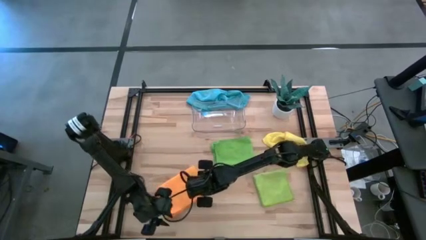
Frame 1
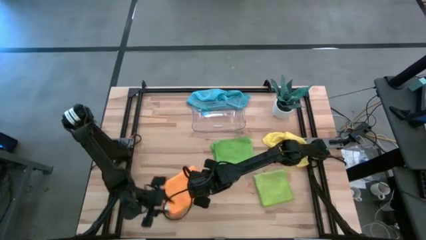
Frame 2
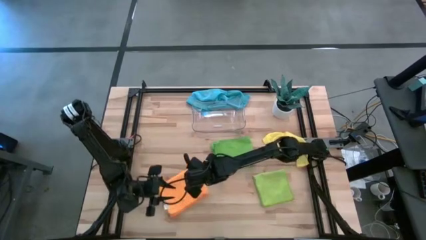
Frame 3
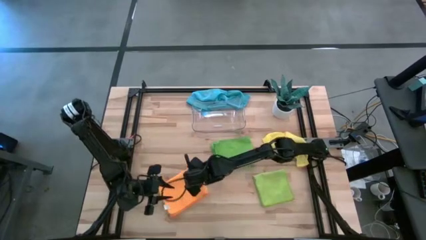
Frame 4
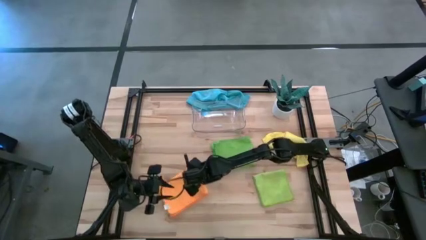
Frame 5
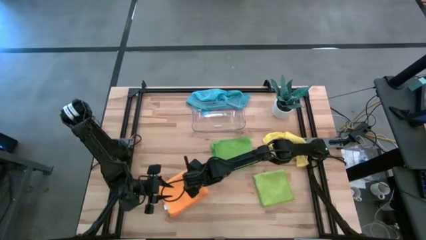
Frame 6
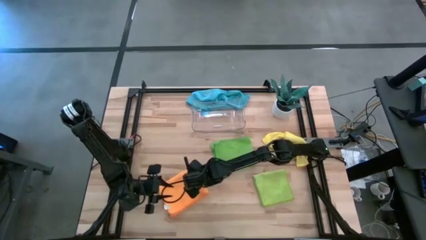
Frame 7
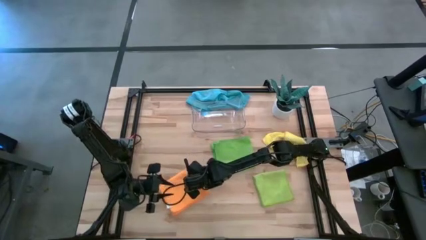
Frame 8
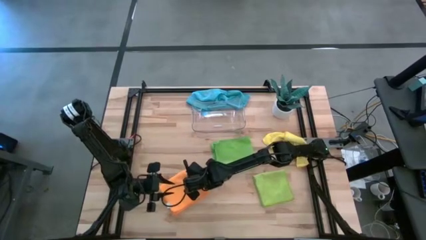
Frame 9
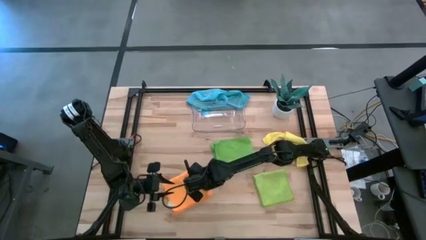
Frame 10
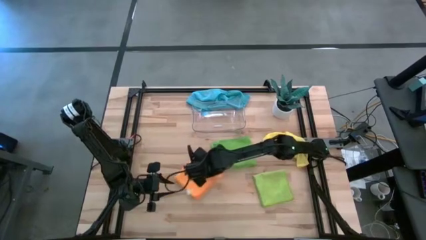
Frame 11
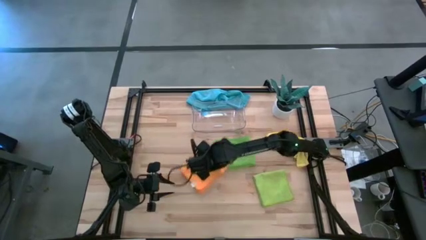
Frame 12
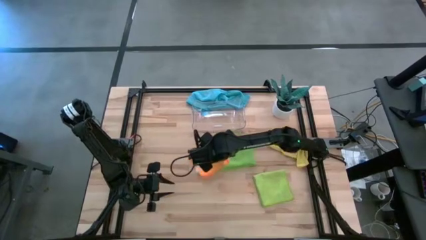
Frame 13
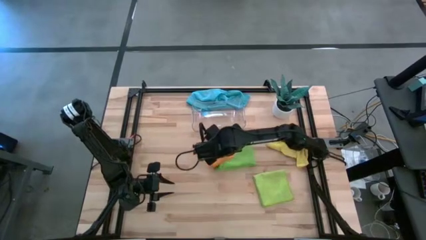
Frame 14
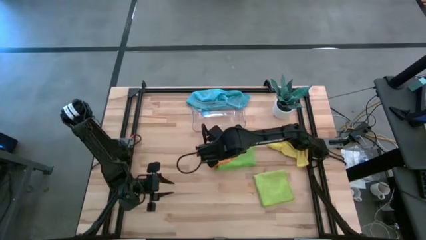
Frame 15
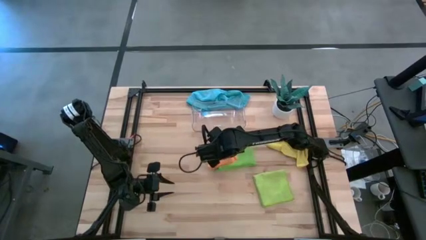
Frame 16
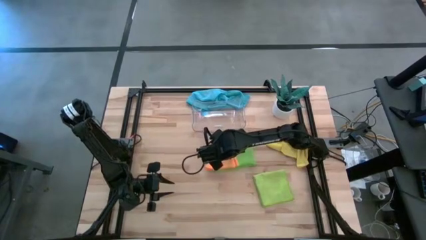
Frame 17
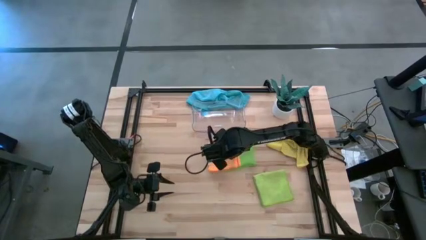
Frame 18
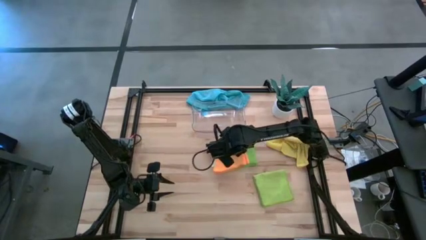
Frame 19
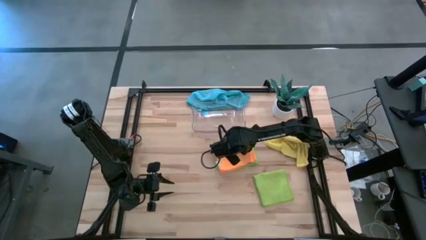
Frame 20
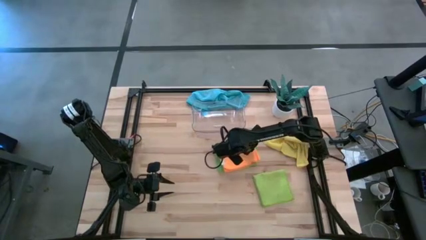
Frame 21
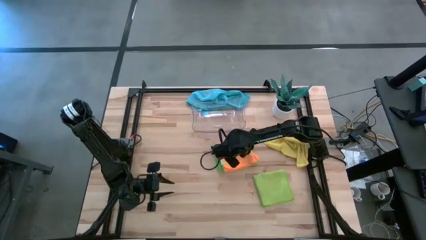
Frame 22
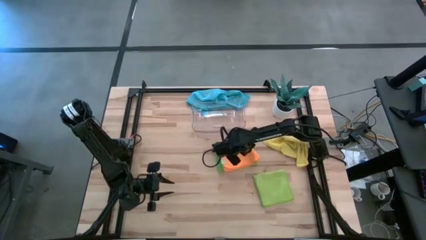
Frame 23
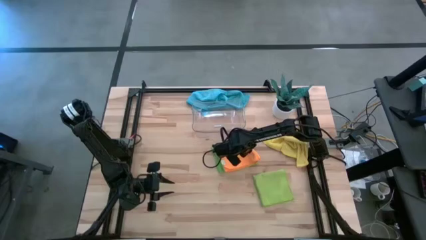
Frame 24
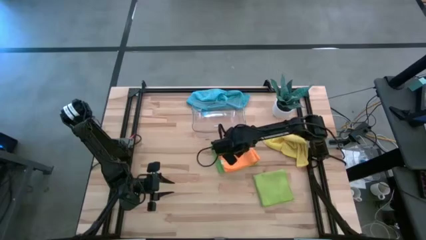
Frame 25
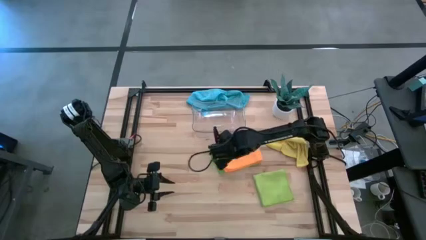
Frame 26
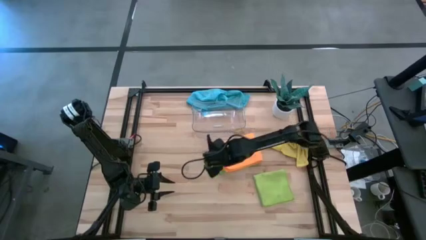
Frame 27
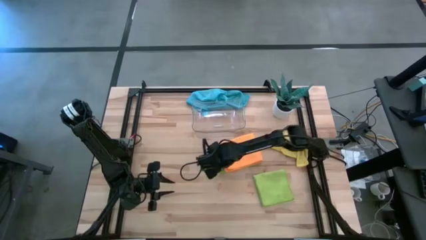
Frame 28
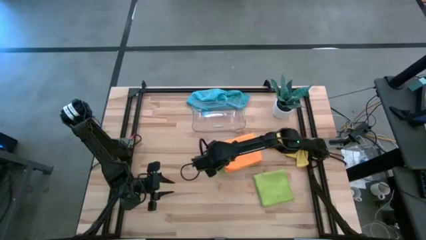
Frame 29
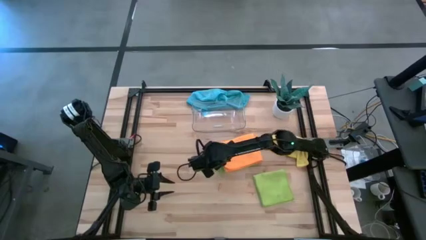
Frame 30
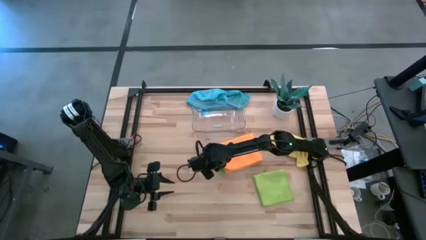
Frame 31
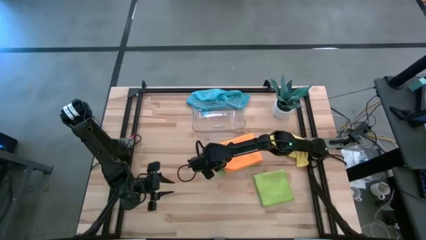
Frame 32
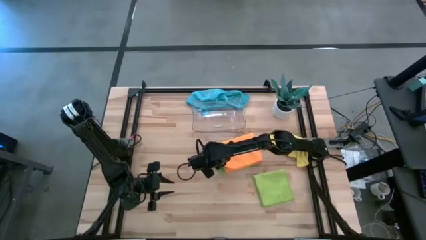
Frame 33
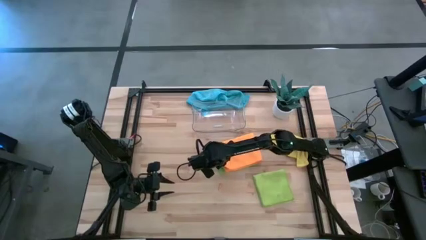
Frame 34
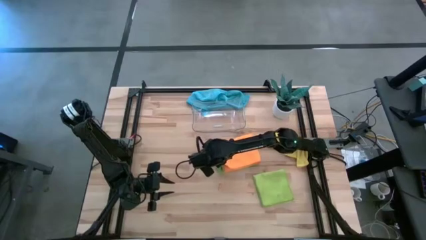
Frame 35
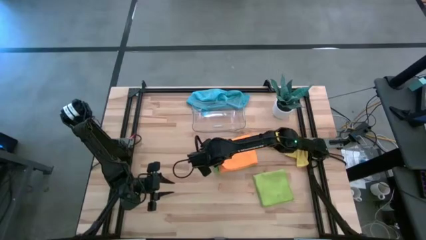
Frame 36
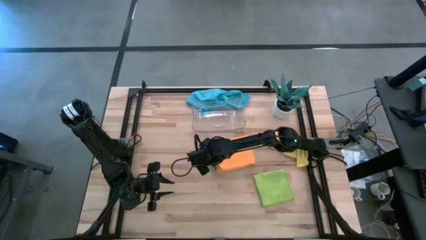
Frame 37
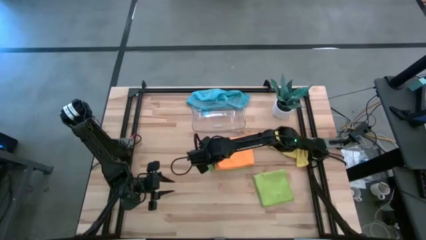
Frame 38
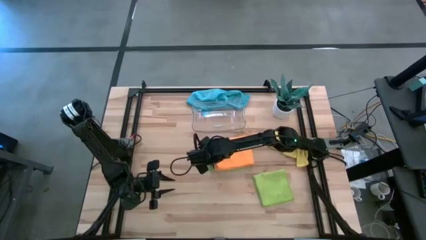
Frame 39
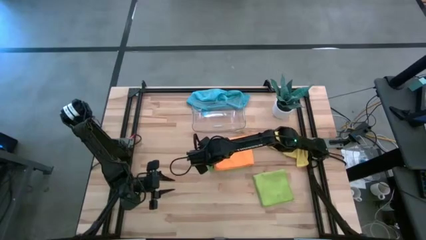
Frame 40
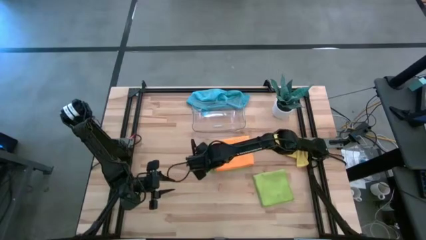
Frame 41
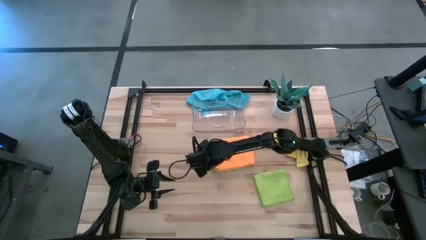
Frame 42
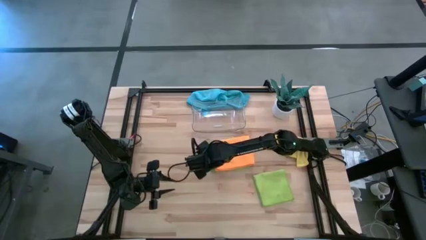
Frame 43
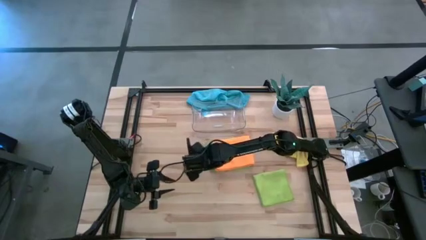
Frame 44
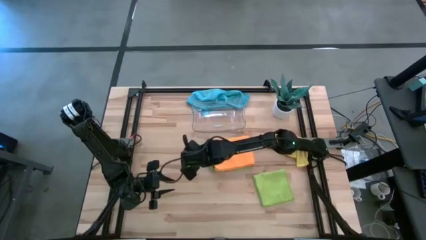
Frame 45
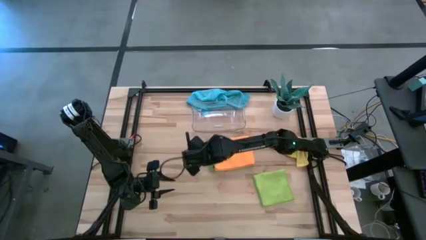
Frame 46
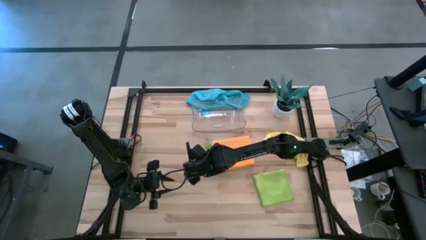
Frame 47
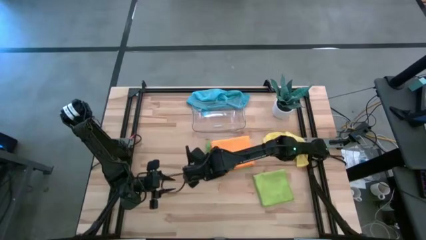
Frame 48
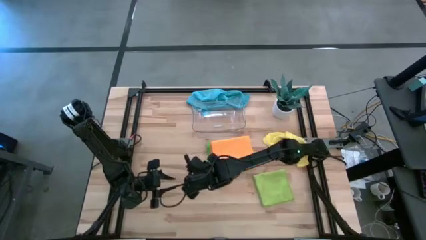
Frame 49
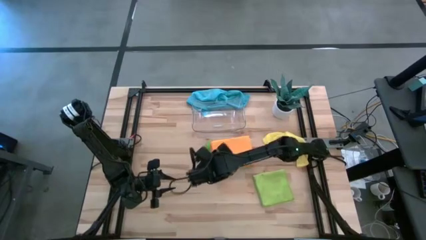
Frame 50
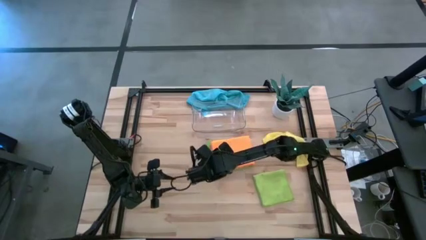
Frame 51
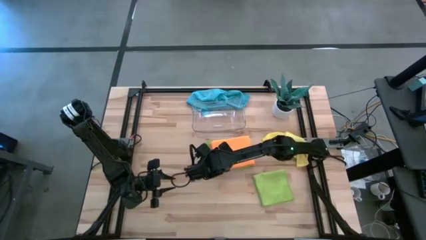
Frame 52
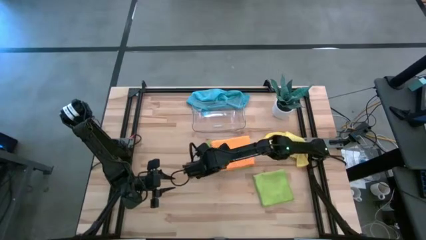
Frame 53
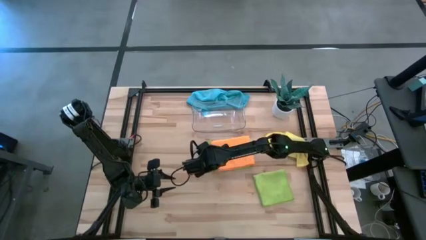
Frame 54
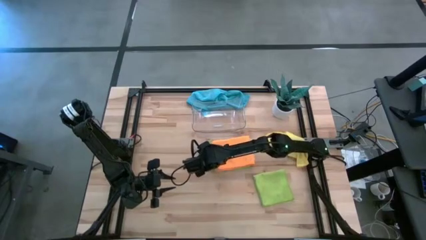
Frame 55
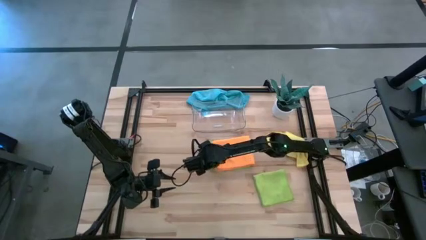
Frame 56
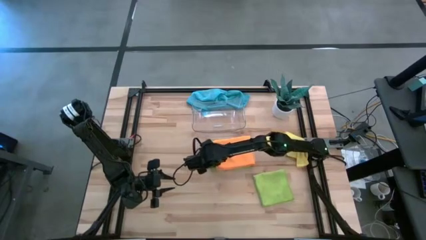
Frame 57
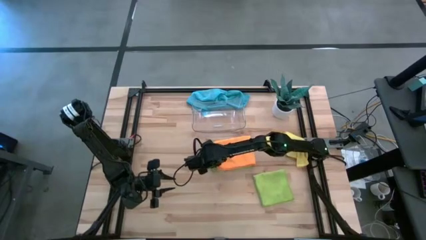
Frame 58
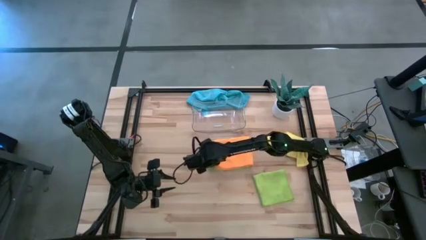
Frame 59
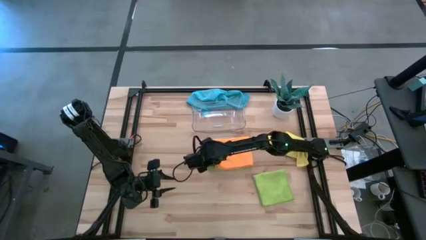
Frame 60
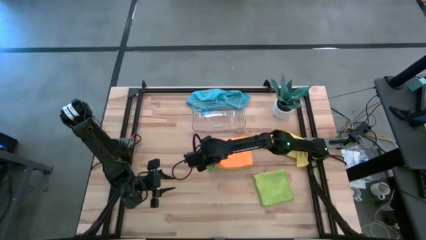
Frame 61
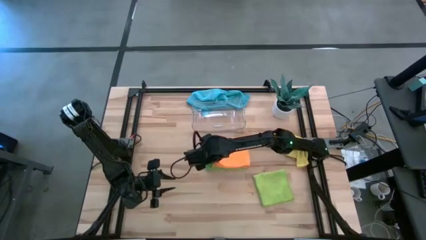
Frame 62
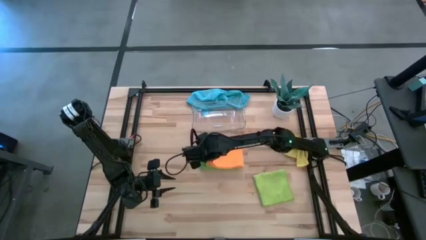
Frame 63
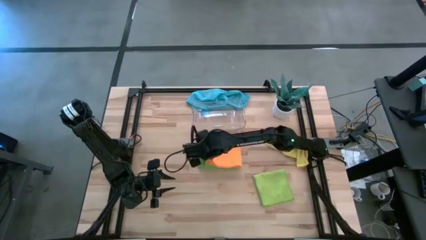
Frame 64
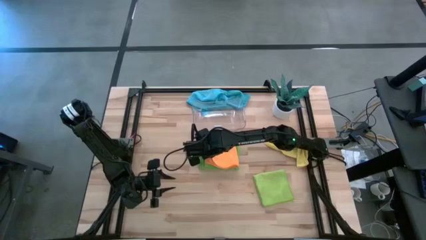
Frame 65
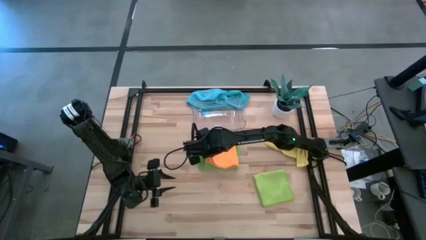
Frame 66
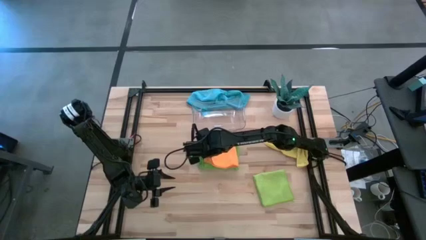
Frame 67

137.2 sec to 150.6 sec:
Task: Fold microfiber towels
Stack the orange microfiber cloth on top of the green microfiber cloth

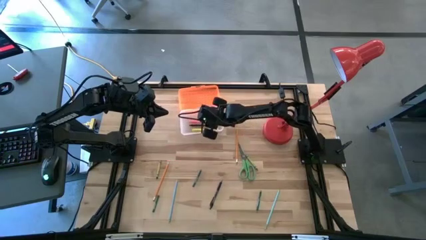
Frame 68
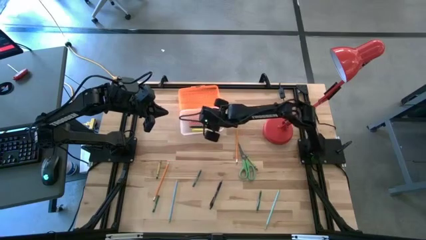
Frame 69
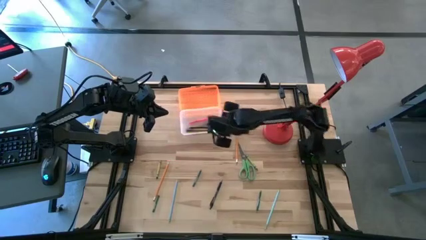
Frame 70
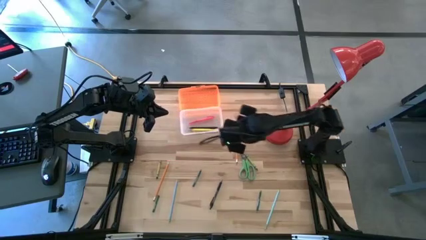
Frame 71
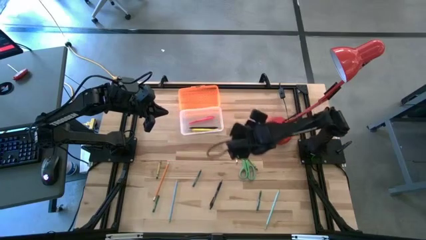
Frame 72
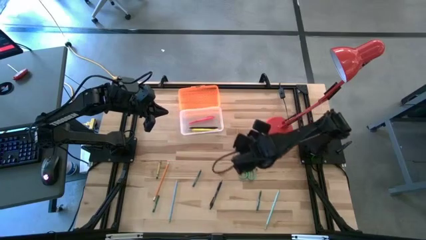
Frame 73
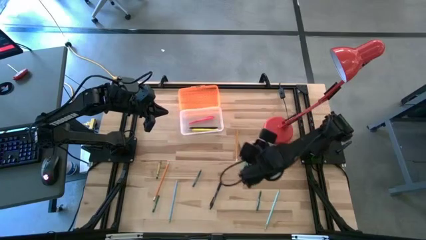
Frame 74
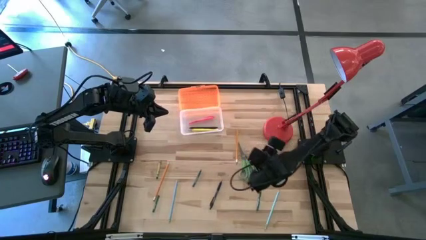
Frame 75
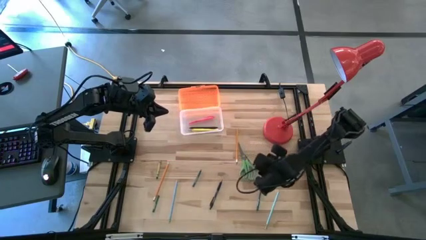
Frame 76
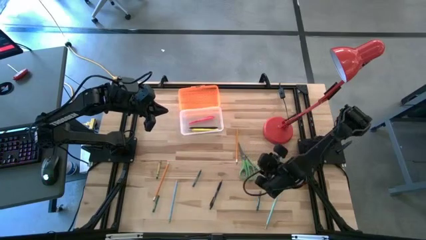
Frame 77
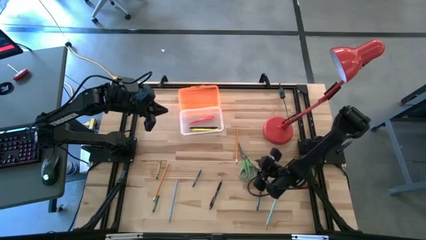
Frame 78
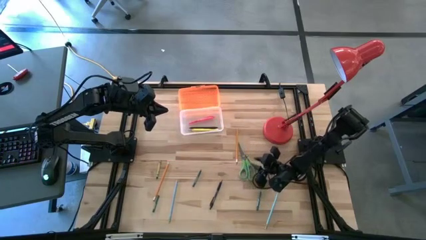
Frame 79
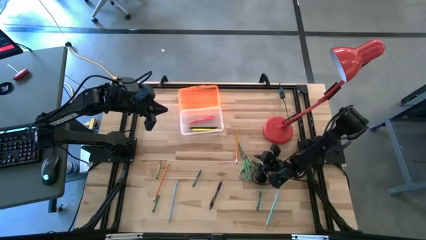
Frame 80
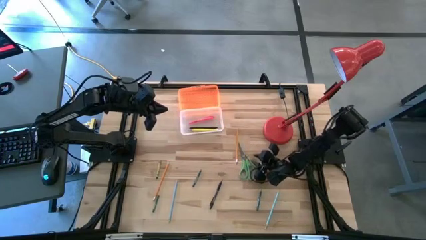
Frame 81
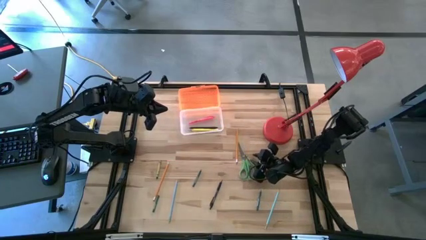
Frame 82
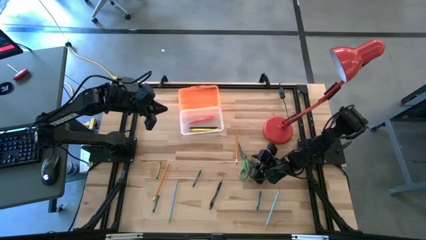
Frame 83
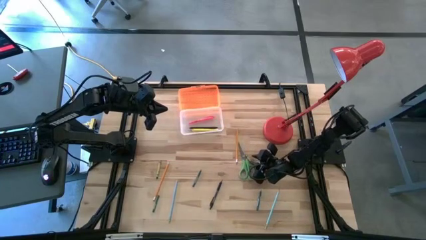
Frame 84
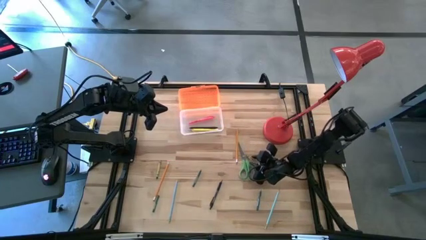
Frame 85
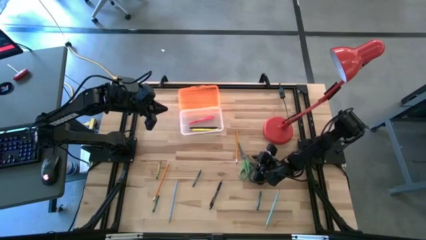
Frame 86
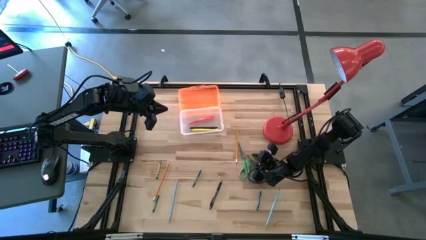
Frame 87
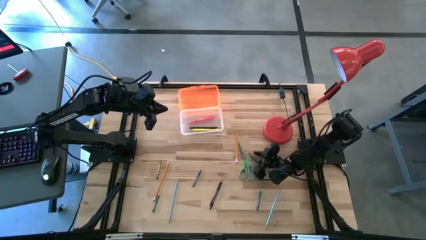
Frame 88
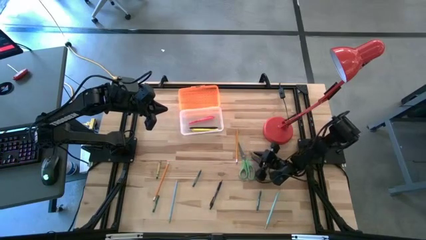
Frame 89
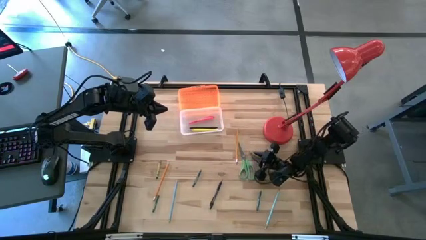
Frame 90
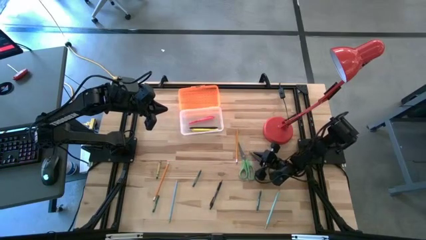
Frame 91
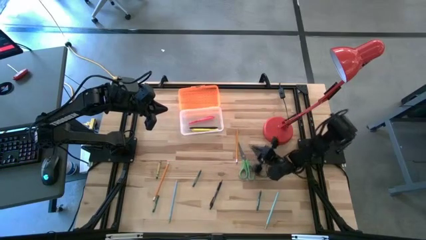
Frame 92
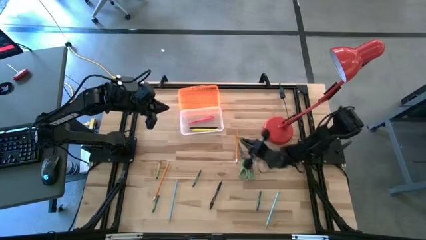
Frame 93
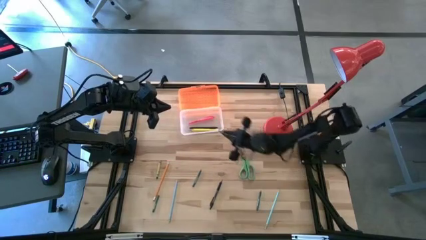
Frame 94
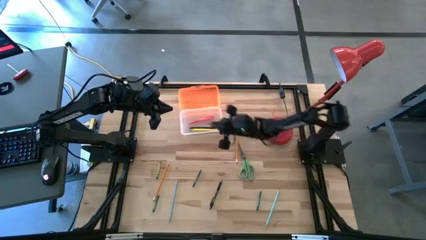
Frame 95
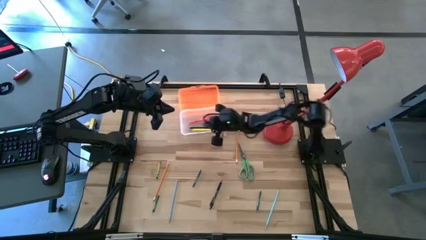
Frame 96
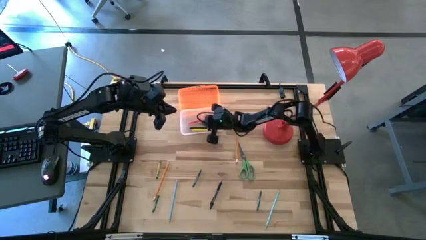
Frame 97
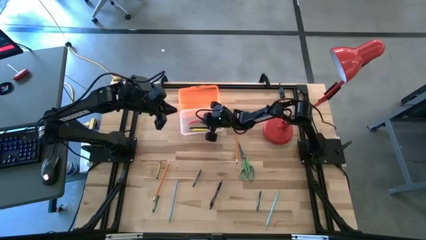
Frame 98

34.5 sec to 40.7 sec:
Task: Pick & place school supplies into a supply box
Put the right green crayon into the orange supply box
